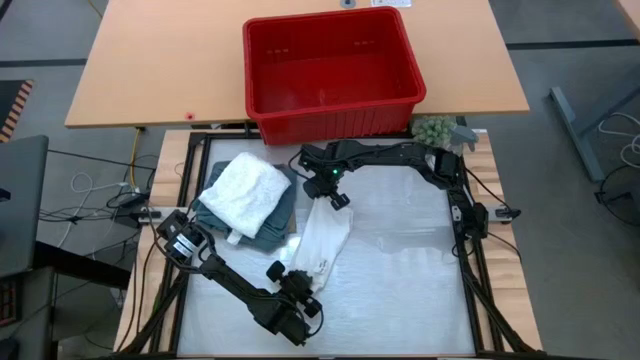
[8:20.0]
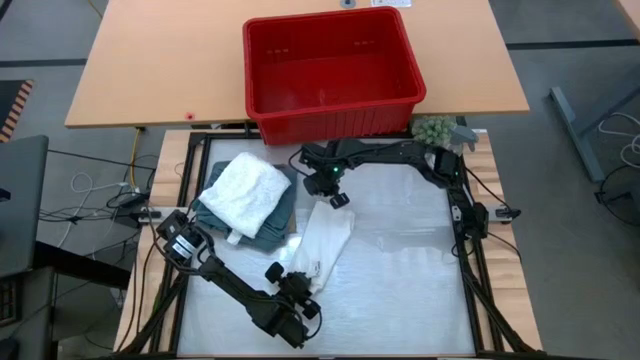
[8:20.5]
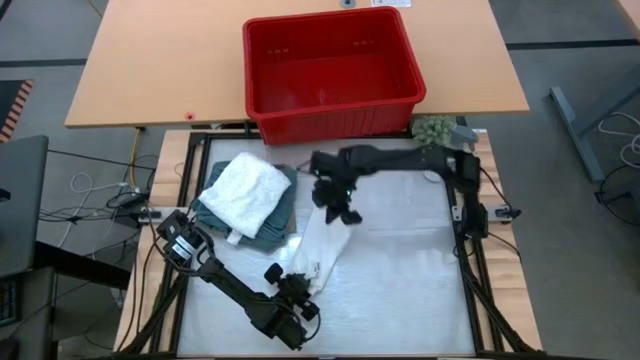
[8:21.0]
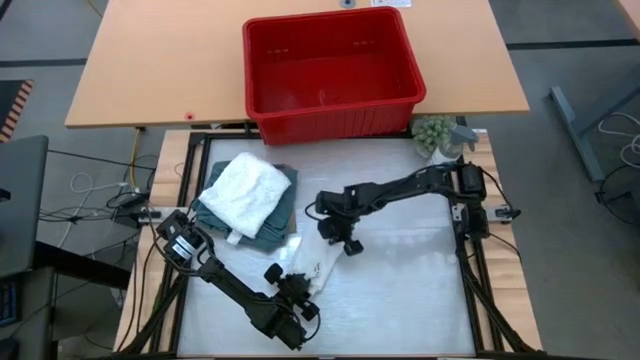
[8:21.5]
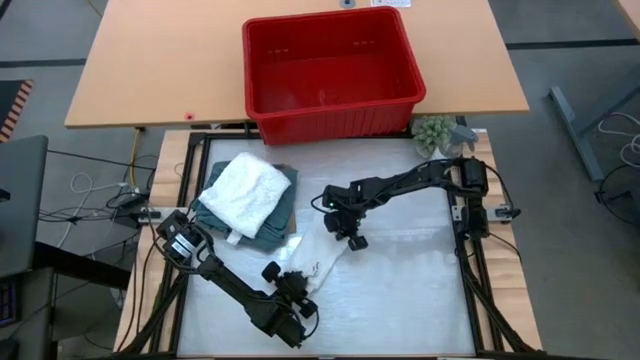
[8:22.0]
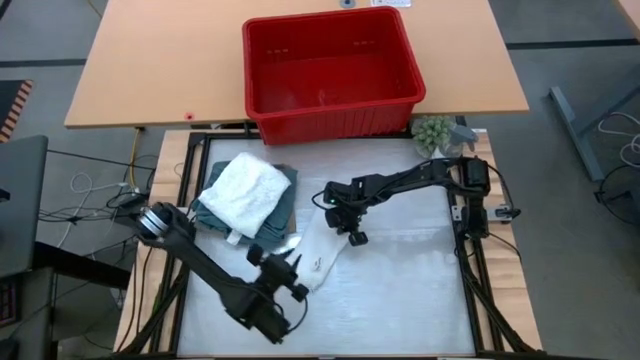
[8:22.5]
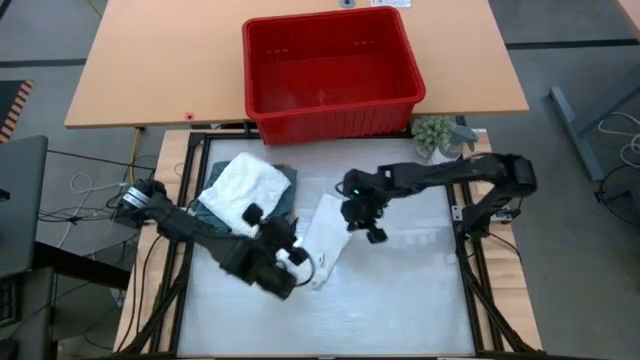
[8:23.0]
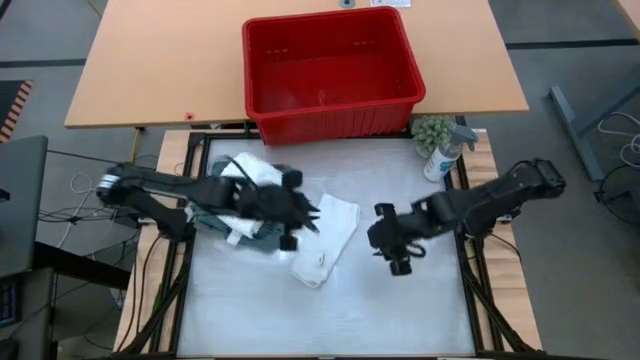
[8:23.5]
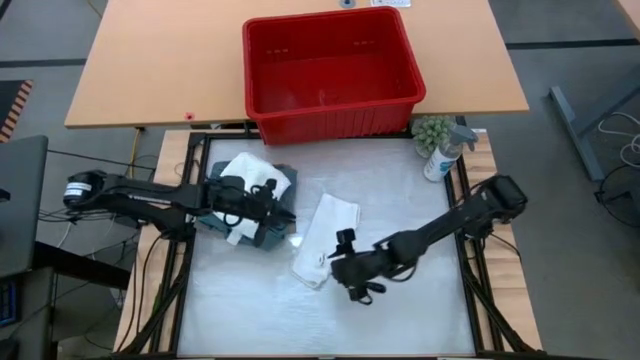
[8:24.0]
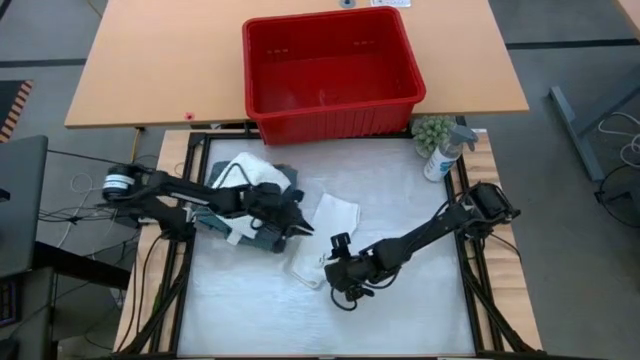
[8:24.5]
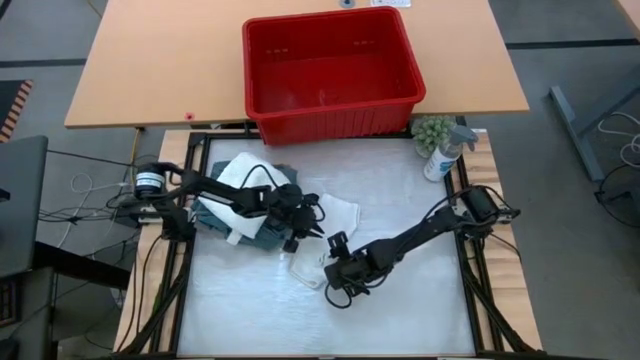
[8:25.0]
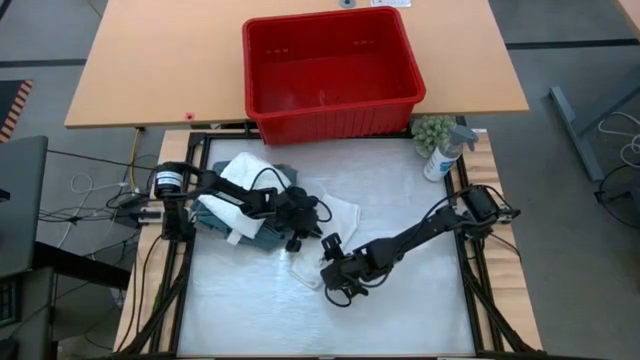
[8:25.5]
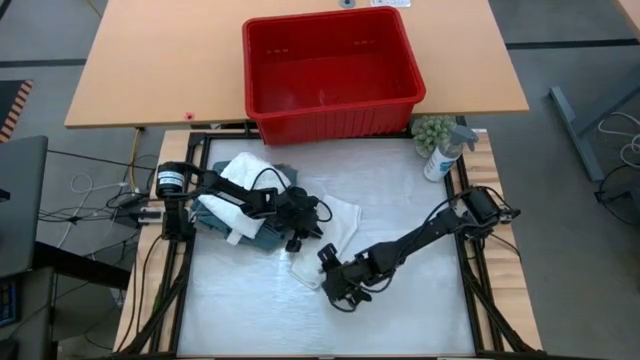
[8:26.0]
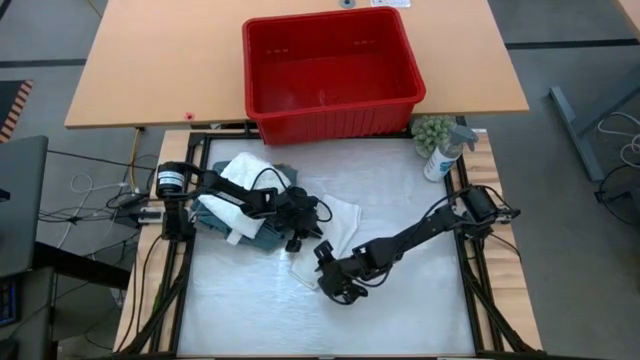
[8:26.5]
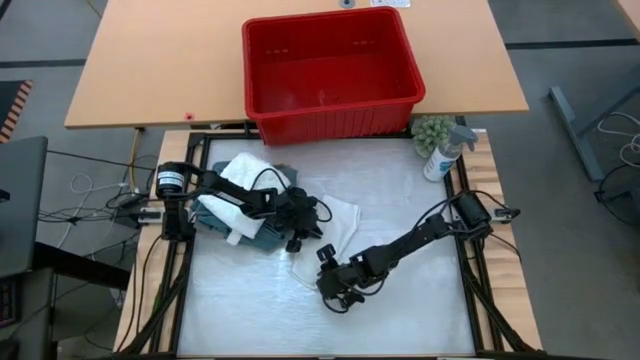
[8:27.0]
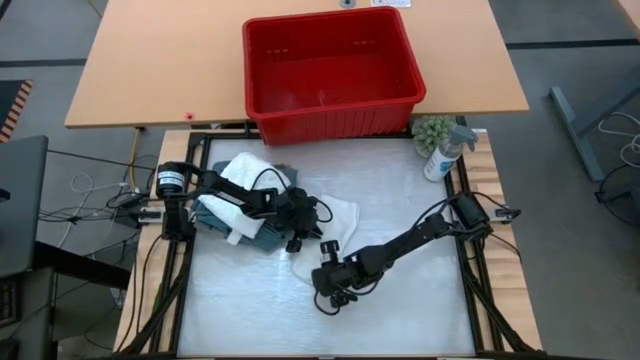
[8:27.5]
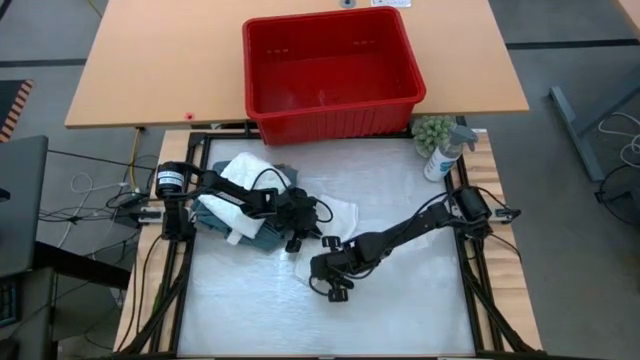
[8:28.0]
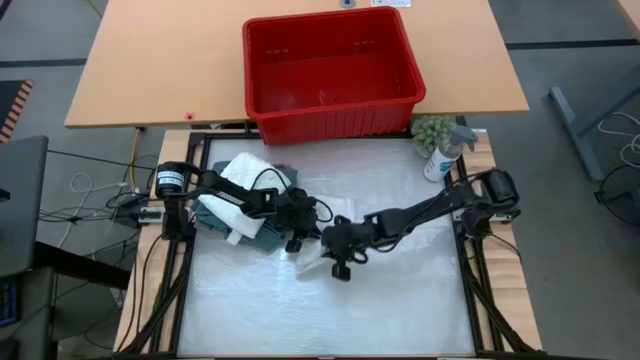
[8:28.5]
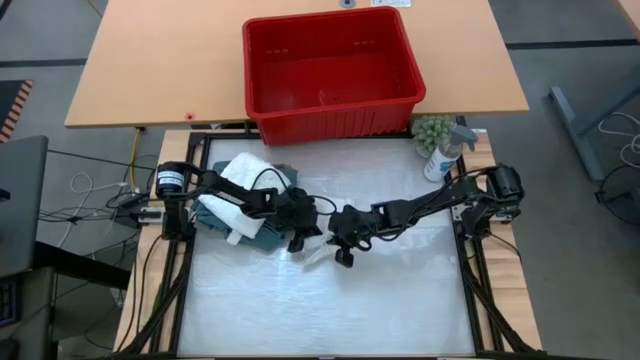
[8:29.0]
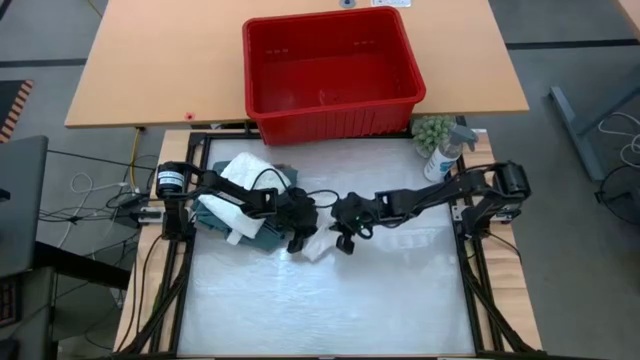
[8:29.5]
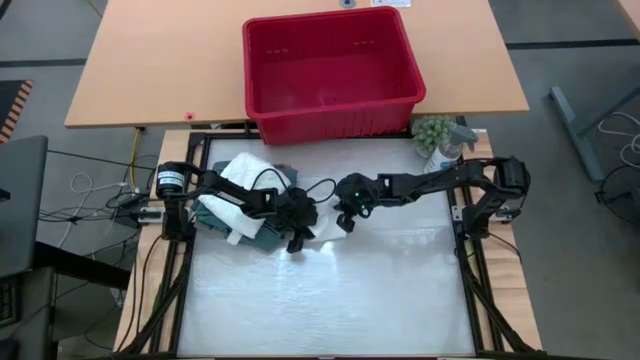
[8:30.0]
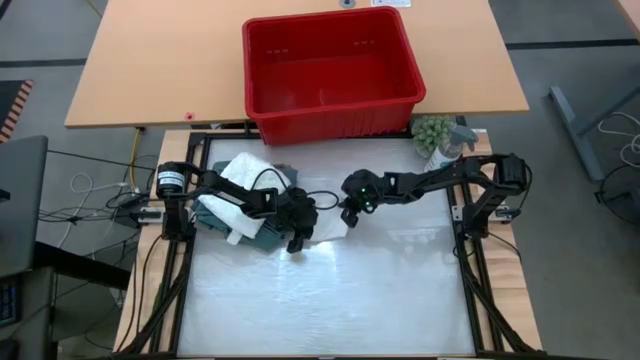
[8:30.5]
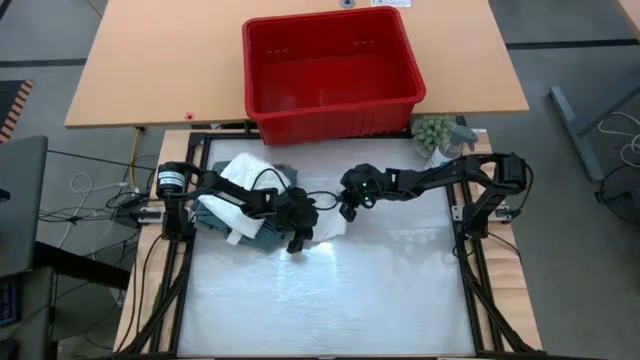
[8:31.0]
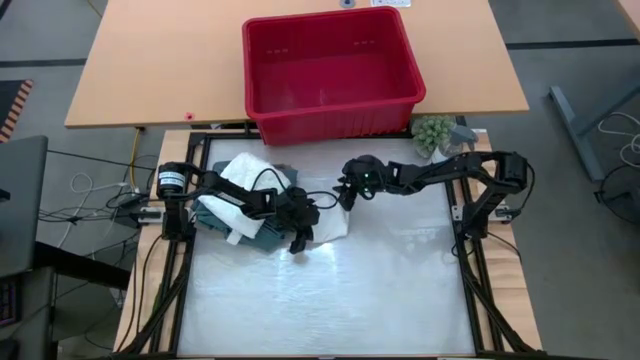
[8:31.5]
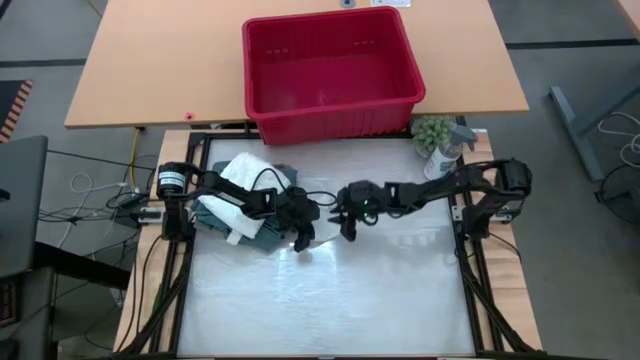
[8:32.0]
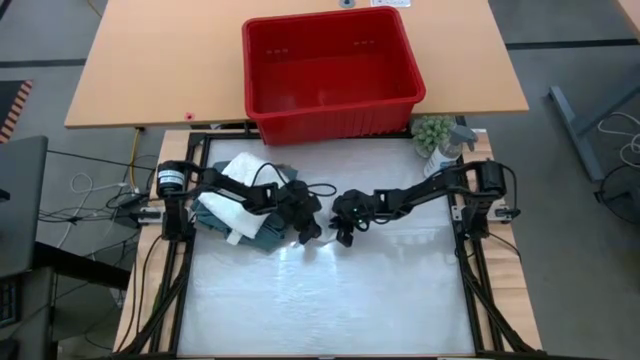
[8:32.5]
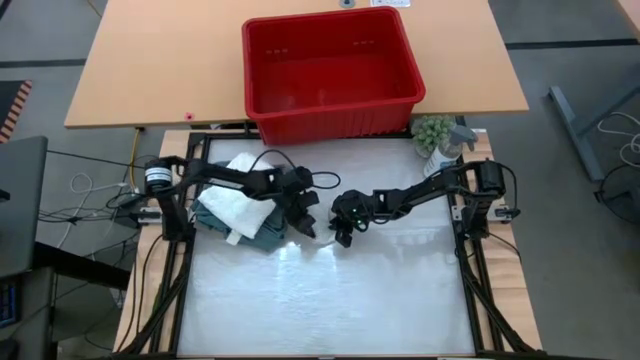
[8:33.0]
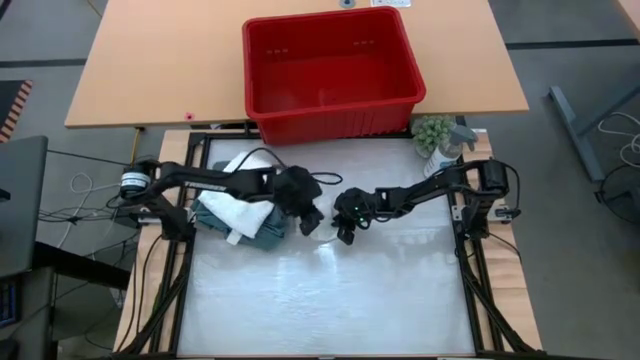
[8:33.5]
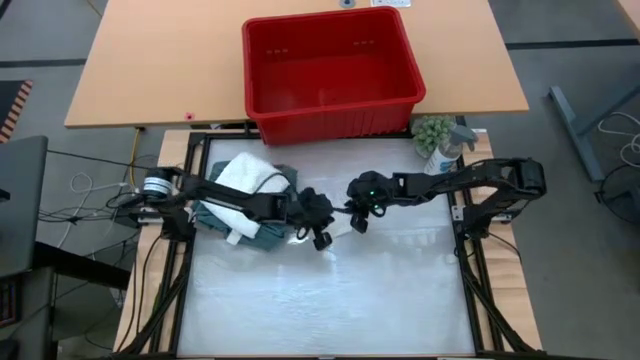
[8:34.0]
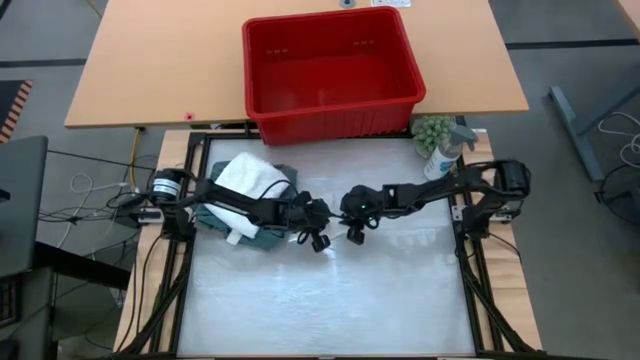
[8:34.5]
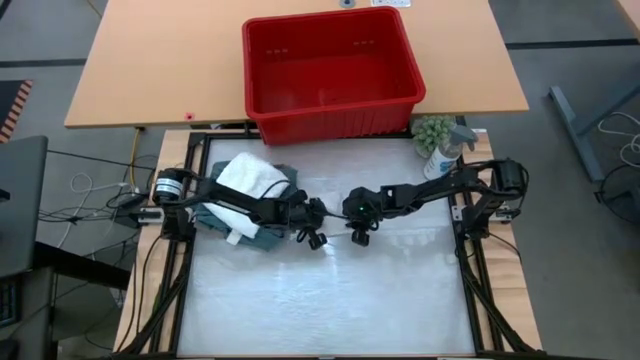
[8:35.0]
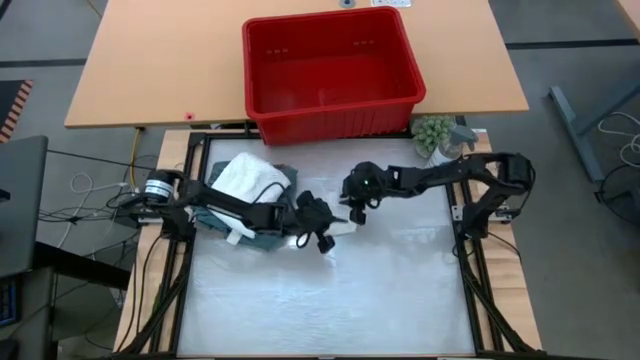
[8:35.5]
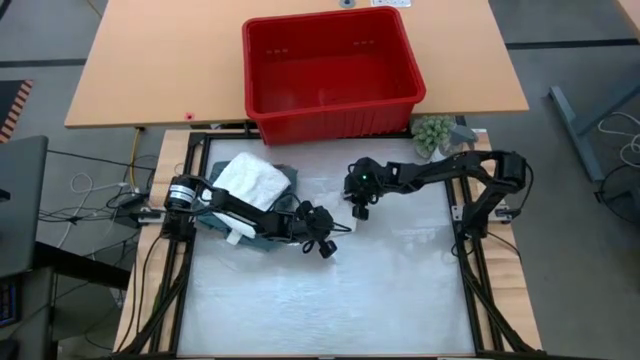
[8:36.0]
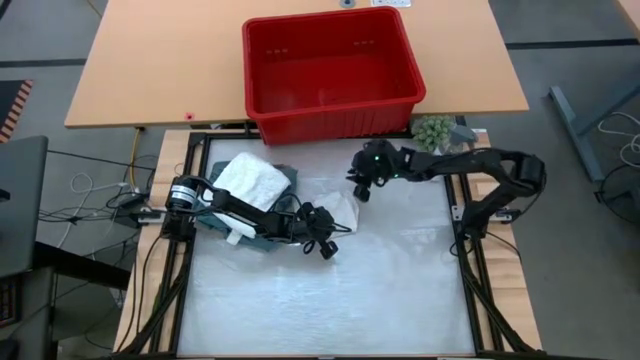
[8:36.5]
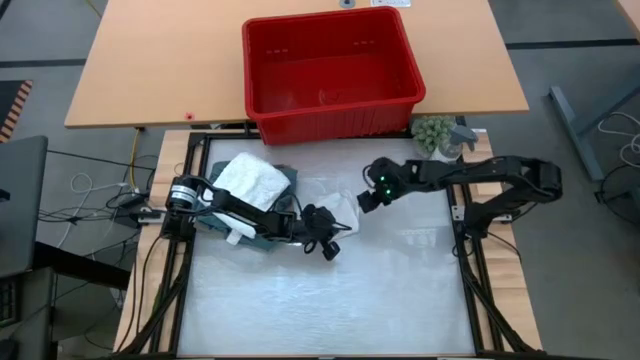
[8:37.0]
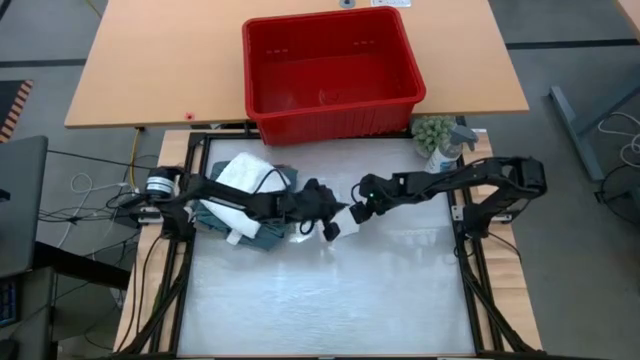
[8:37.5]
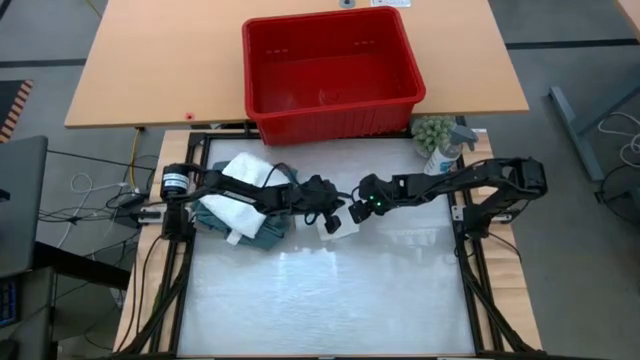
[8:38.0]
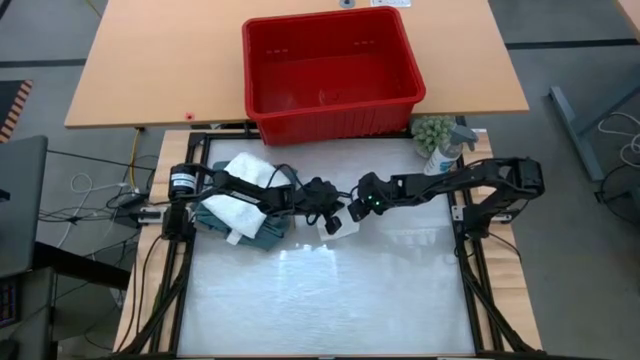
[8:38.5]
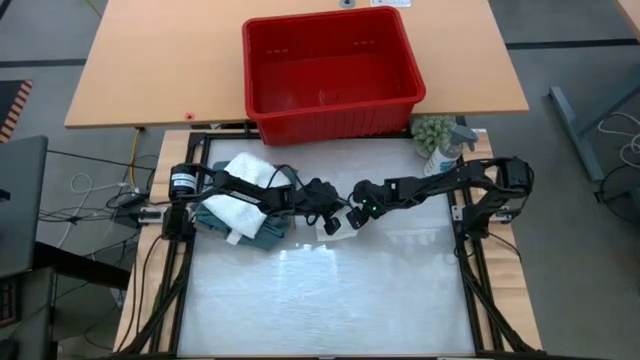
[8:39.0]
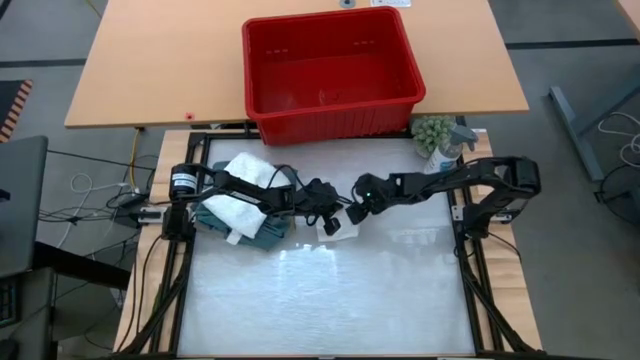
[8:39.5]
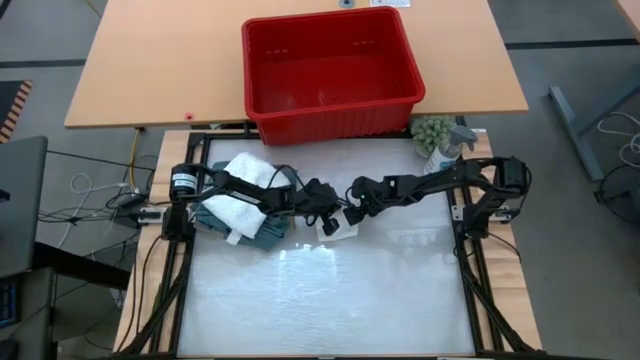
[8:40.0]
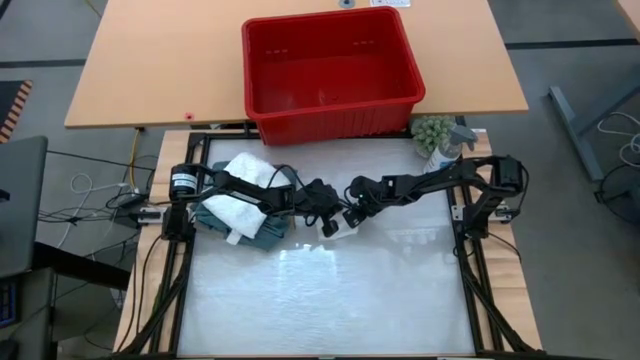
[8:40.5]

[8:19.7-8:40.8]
Task: Fold Laundry from Bin
Fold the white underwear in the red bin

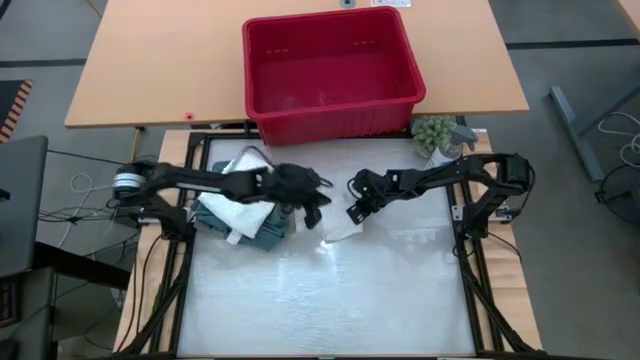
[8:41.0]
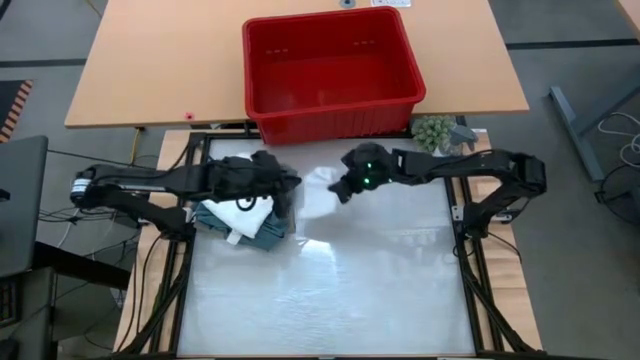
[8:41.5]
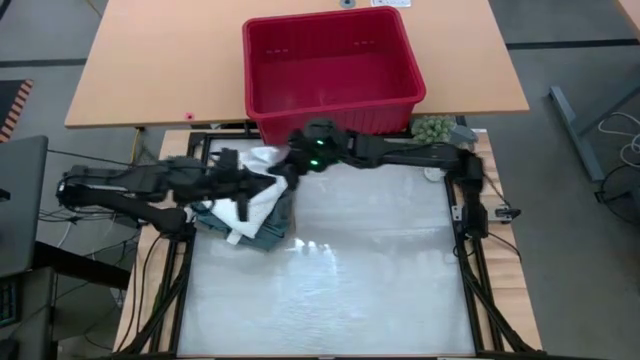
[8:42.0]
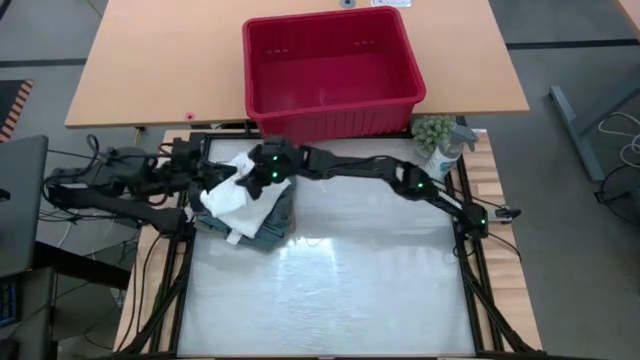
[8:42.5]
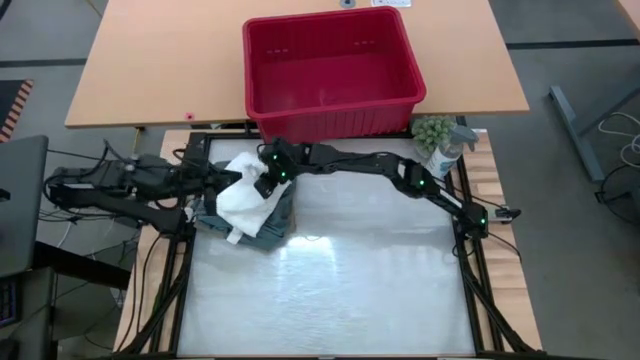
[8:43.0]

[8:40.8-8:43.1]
Stack the folded white underwear on top of the folded white shirt
